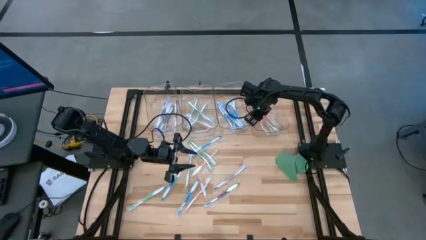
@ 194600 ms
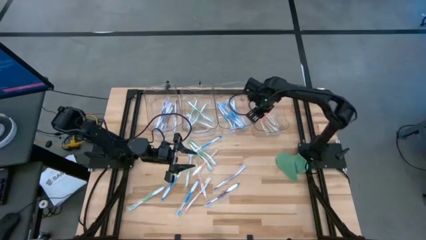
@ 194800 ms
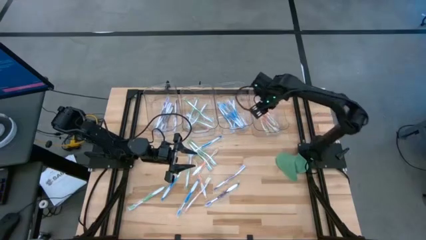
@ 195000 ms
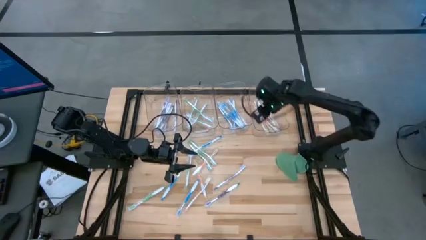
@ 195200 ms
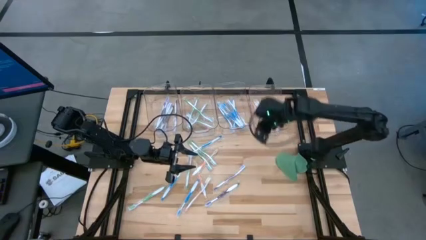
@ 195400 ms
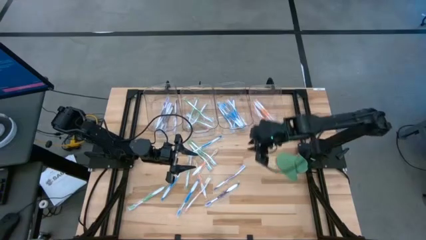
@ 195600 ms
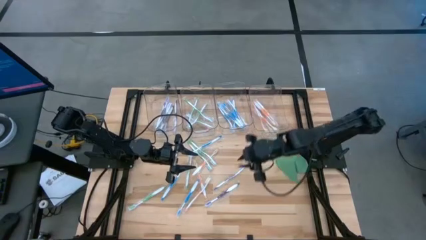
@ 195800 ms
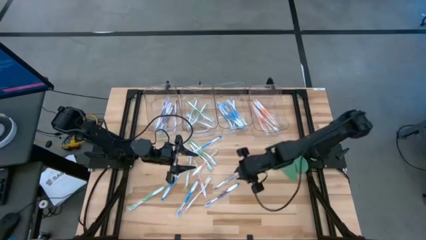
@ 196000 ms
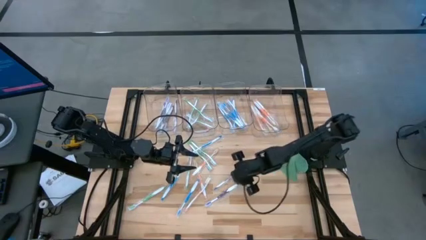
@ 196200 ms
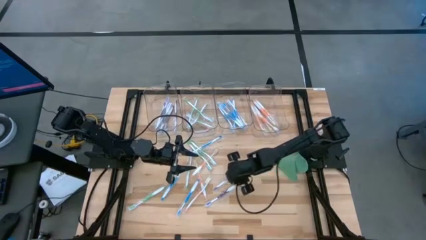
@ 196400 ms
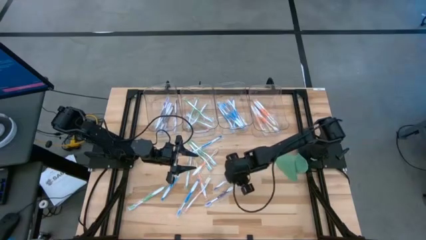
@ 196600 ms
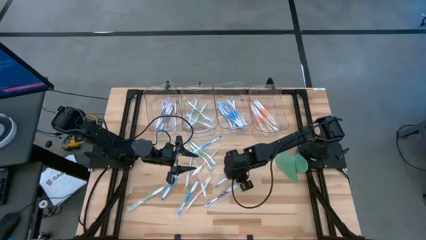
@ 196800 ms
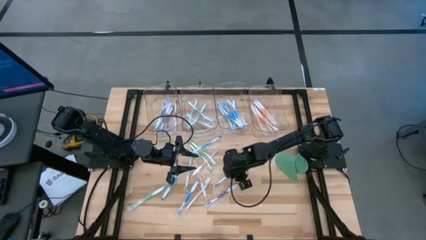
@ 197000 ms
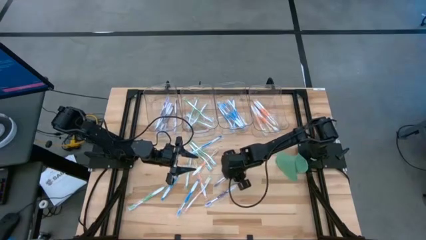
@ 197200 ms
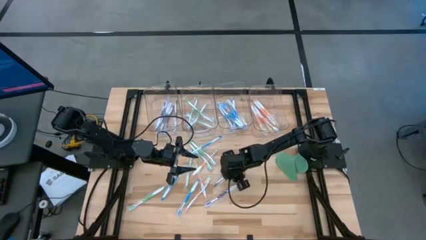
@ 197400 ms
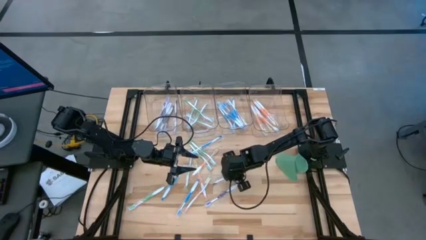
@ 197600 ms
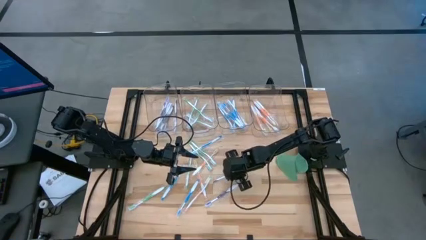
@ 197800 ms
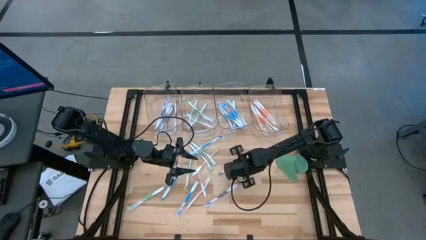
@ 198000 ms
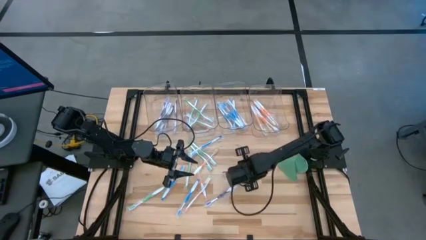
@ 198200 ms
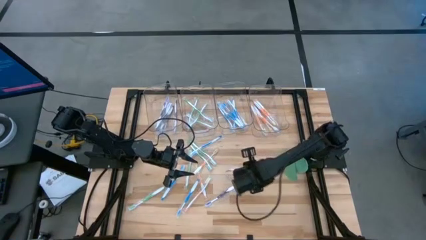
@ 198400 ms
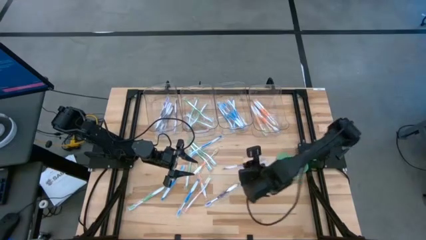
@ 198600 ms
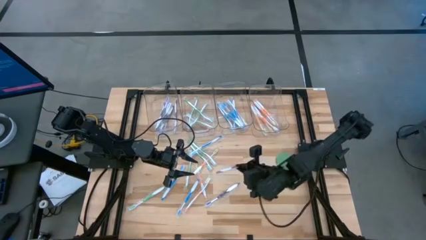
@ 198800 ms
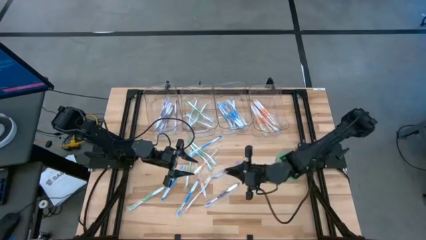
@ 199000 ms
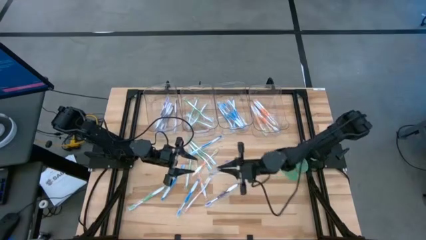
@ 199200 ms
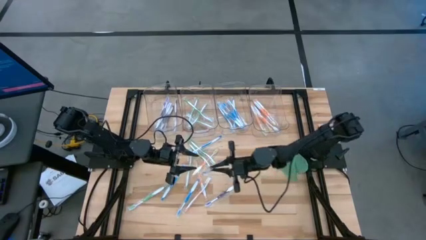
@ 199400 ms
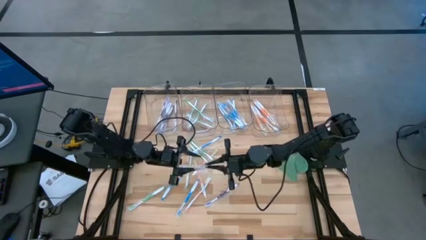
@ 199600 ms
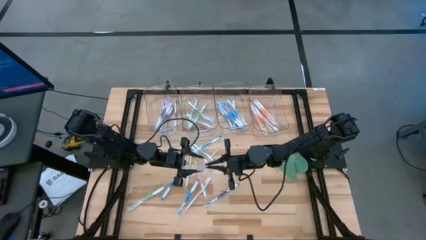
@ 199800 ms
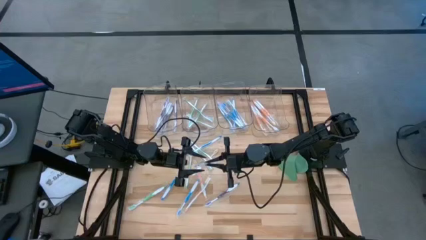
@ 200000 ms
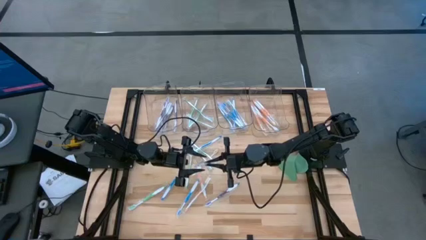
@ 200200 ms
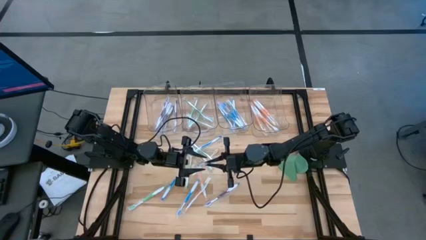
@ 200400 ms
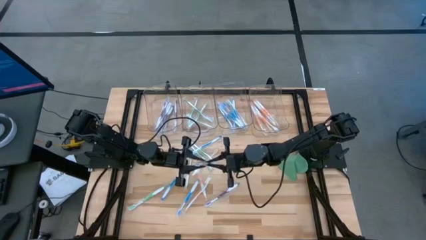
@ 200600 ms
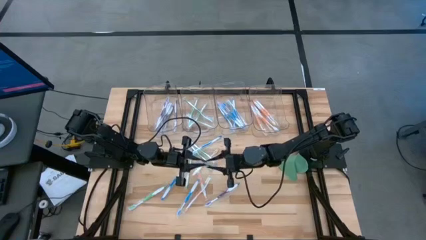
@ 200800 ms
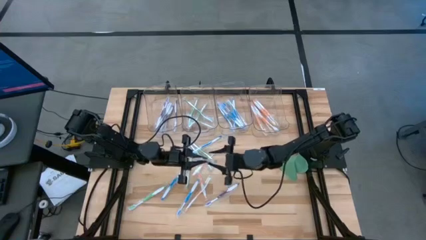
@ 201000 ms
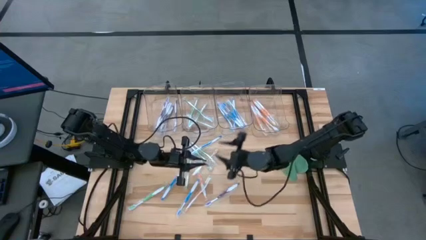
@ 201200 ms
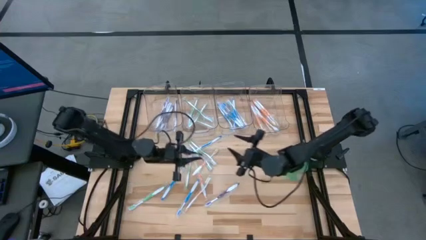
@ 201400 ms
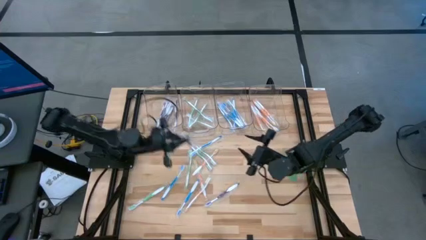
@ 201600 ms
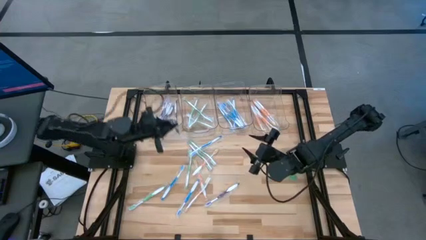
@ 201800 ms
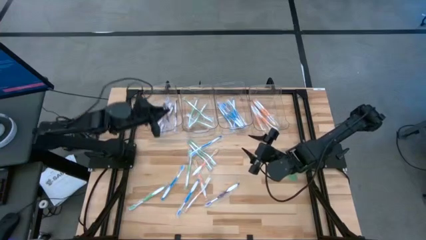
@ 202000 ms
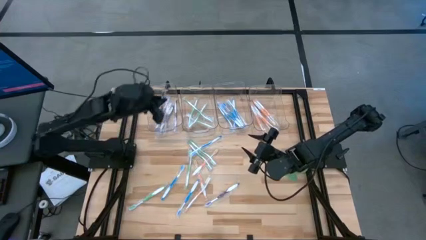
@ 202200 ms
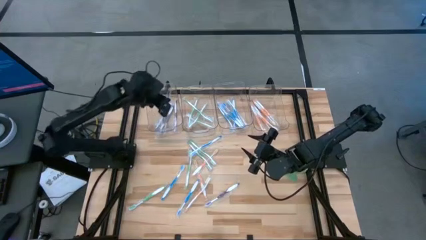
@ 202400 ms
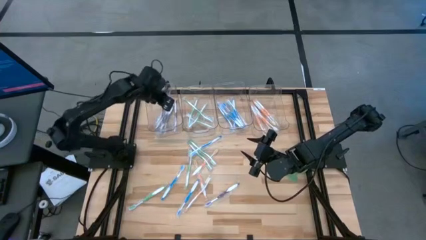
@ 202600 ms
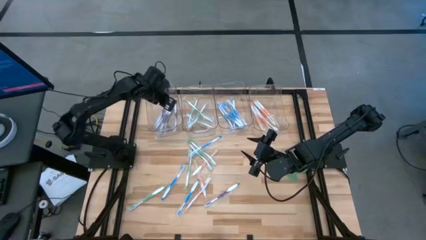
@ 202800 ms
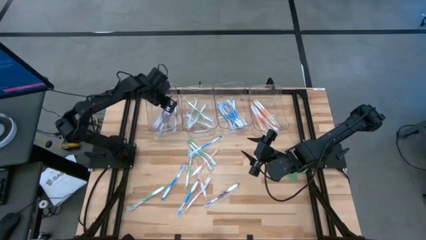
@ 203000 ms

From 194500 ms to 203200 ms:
Task: Pick & Place Toothbrushes
Put the purple toothbrush into the left transparent bin

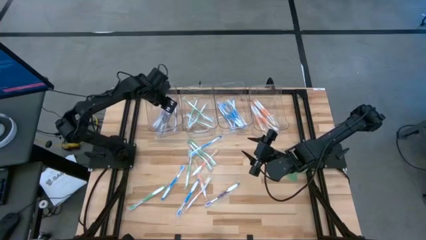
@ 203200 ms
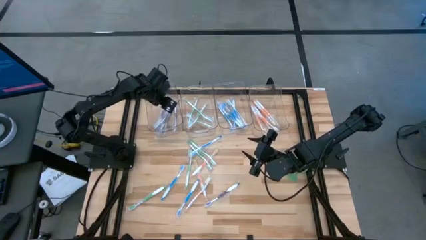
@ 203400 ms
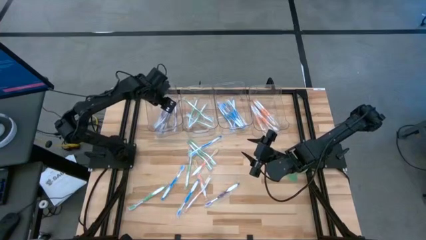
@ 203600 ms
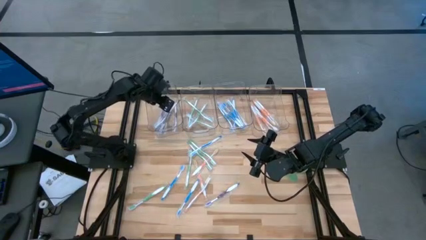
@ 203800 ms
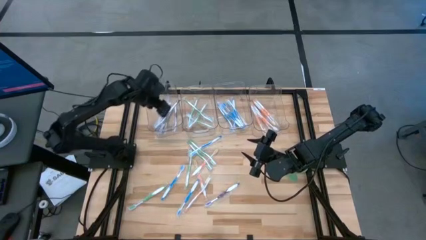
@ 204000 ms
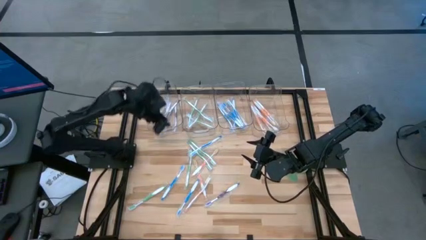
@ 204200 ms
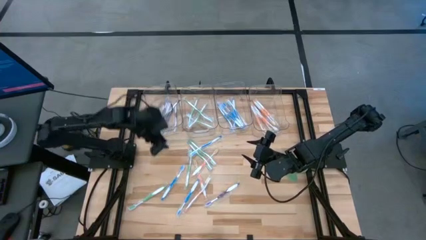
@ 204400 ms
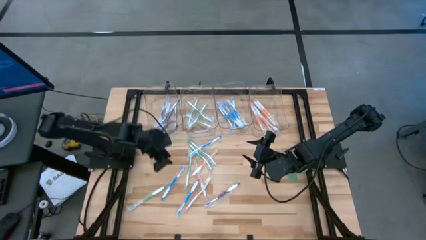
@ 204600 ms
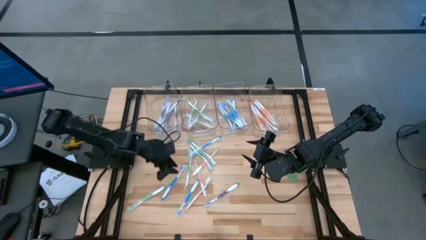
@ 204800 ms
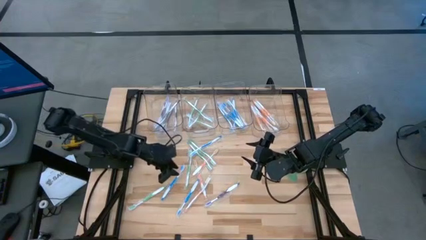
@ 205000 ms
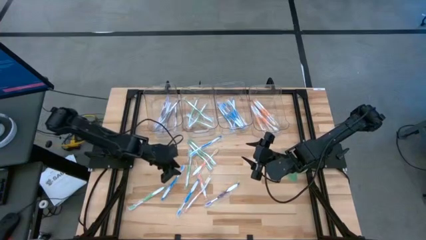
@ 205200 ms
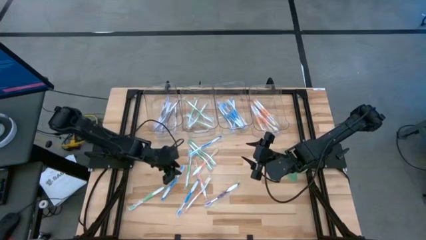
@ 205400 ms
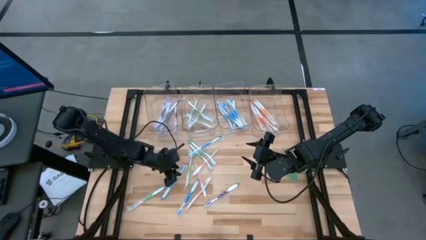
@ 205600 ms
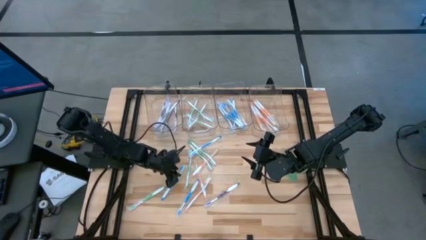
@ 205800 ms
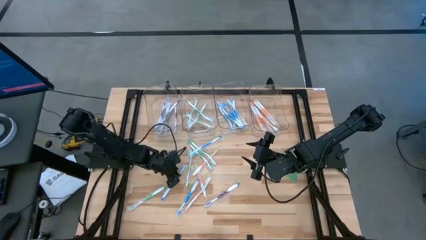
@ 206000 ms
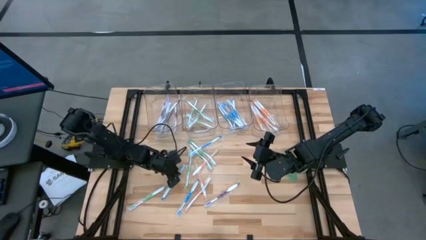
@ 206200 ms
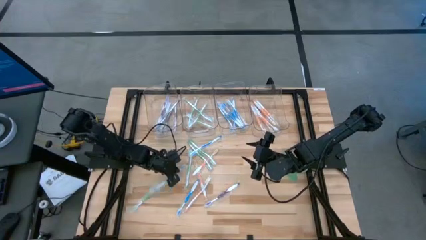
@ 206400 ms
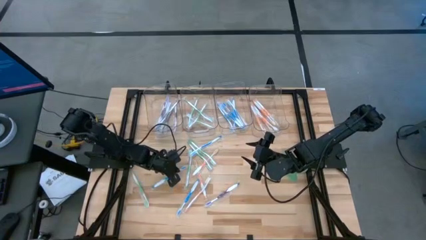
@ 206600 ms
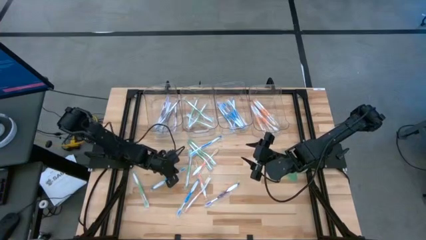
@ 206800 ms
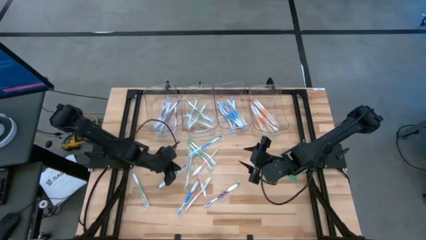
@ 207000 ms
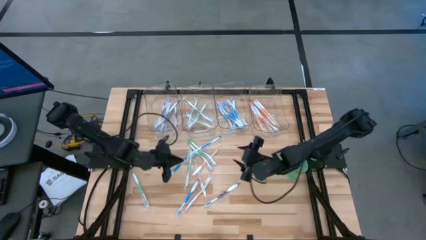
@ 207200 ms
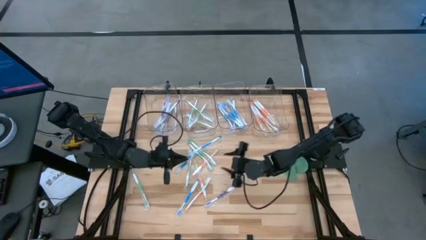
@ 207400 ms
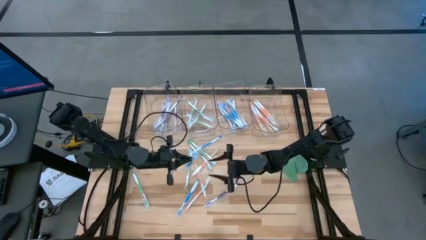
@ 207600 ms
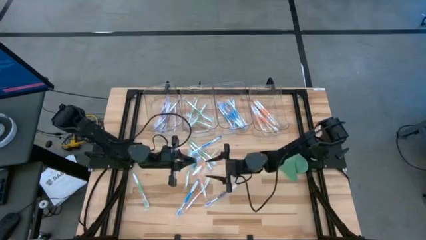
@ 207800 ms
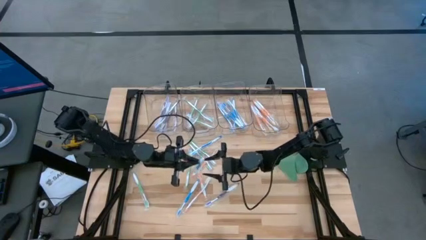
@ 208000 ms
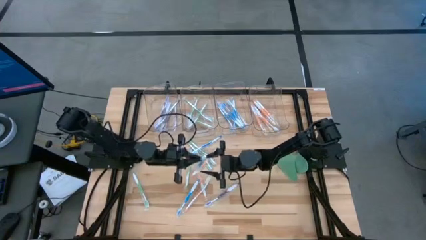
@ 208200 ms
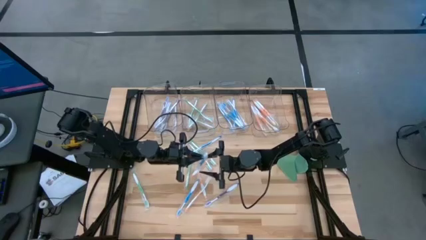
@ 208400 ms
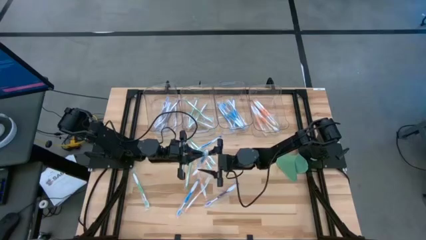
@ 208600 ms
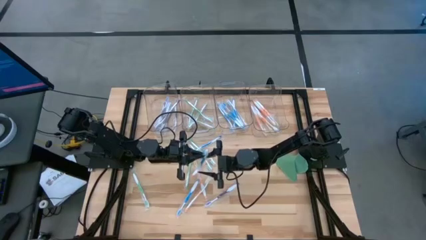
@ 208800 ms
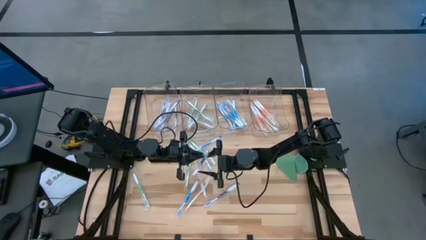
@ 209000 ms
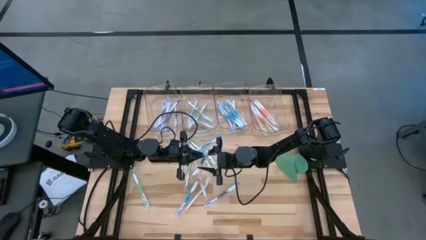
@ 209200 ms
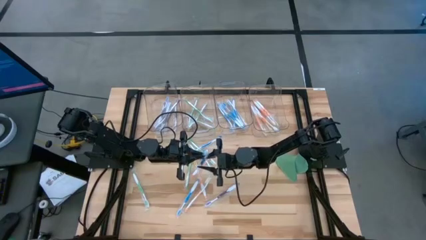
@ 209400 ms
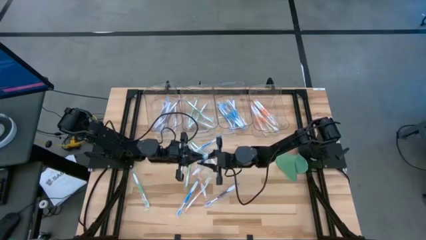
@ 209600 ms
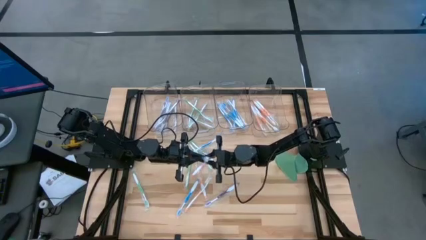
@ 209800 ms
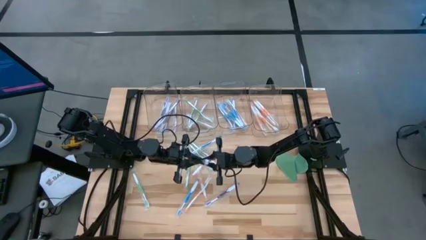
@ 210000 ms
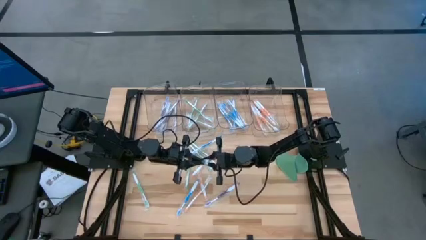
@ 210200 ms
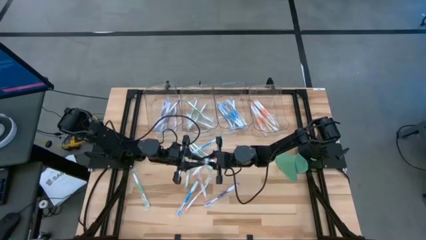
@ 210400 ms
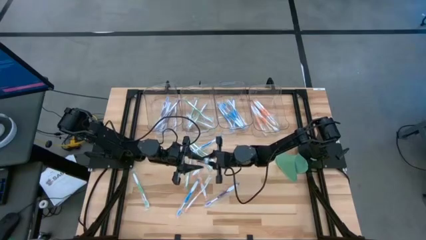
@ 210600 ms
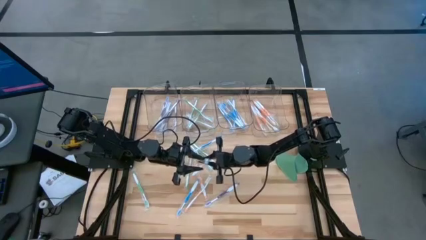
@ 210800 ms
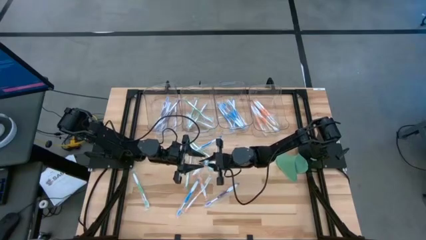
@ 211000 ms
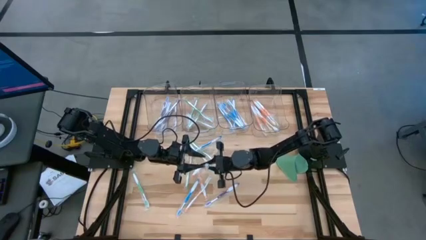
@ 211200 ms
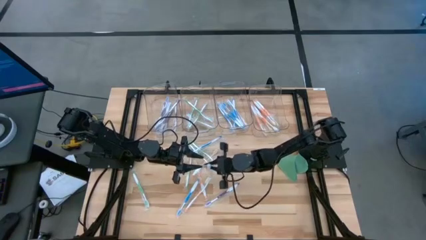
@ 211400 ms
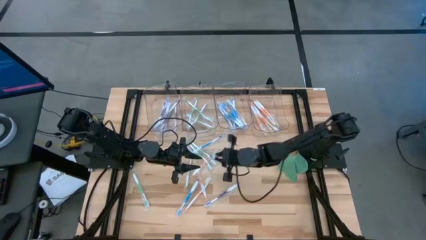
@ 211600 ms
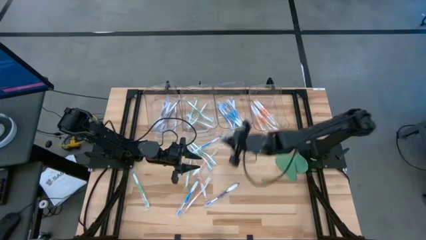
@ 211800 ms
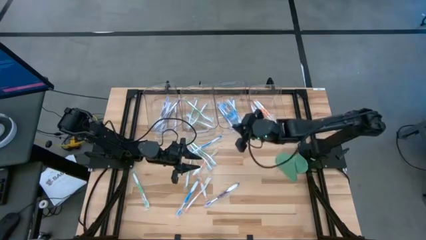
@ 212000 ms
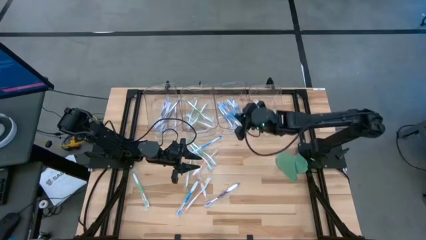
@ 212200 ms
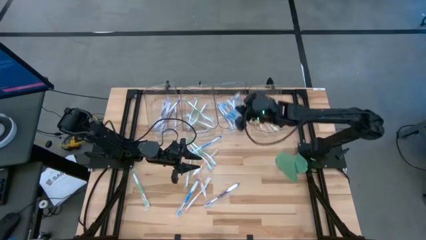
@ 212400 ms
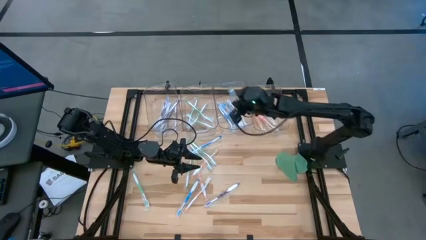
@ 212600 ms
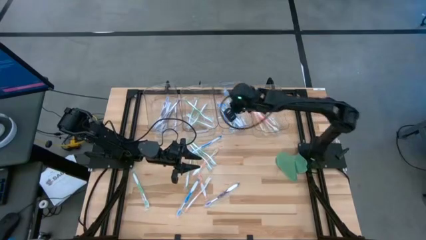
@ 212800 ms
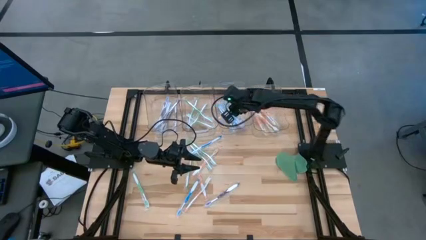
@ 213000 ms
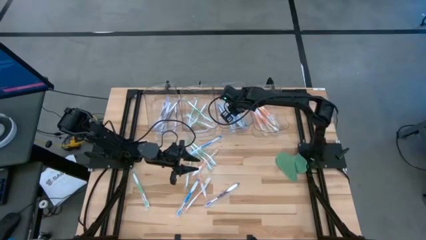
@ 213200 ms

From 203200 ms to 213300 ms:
Put the blue toothbrush into the middle right transparent bin
